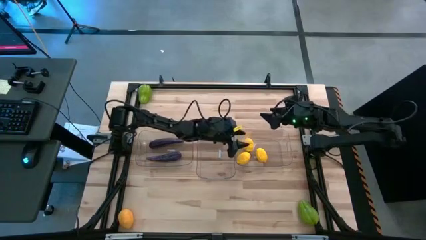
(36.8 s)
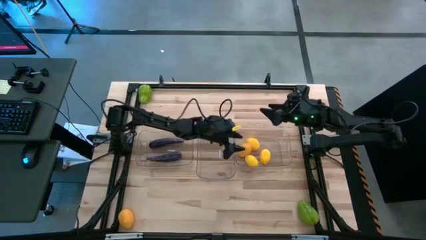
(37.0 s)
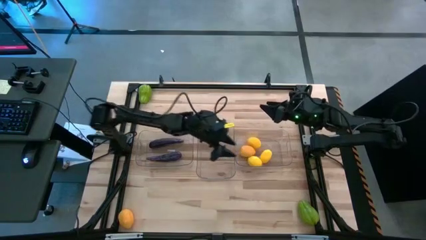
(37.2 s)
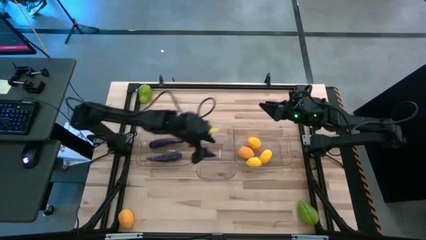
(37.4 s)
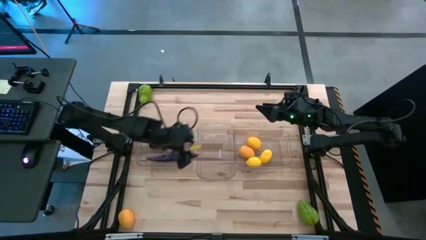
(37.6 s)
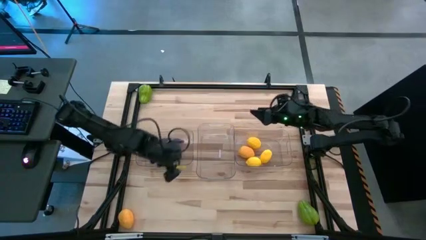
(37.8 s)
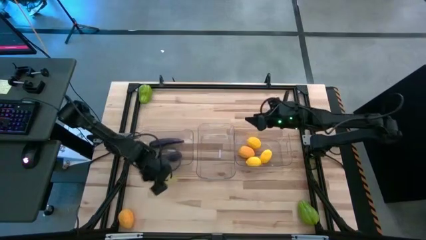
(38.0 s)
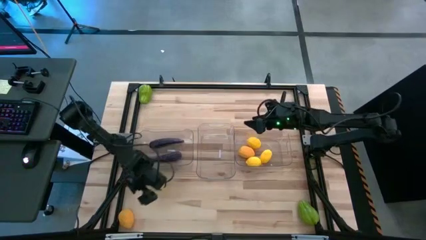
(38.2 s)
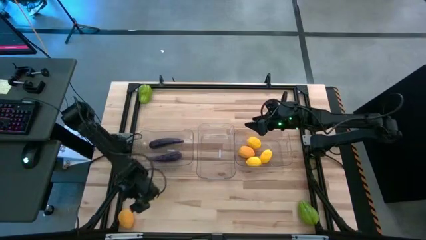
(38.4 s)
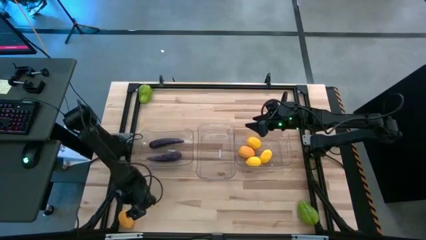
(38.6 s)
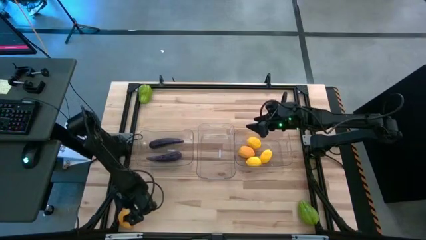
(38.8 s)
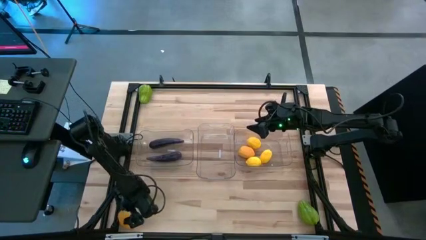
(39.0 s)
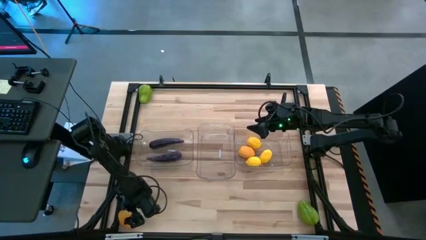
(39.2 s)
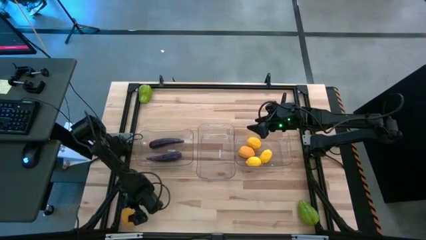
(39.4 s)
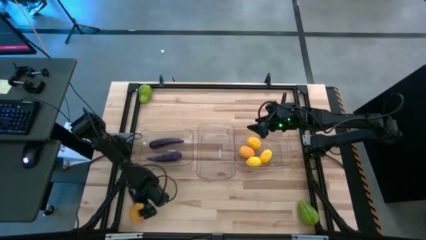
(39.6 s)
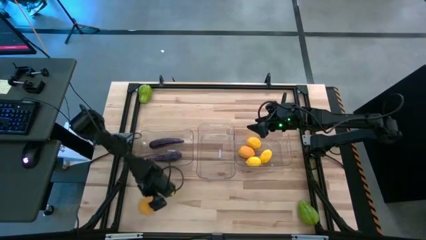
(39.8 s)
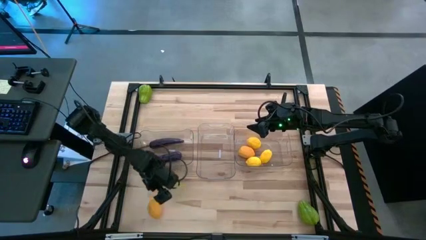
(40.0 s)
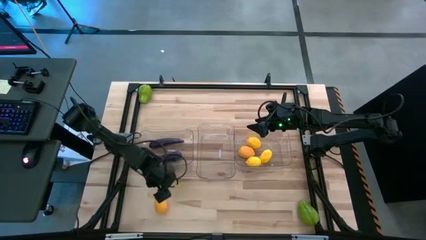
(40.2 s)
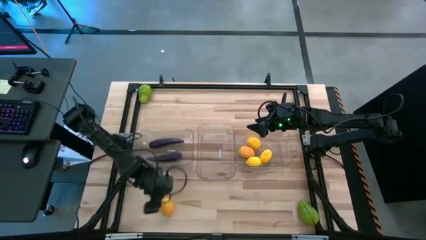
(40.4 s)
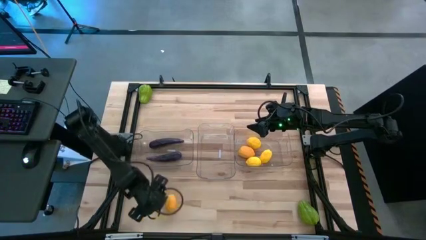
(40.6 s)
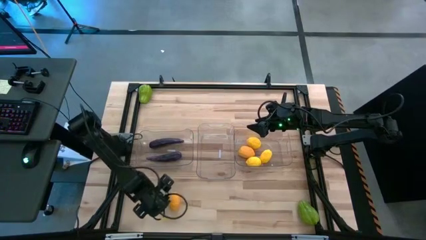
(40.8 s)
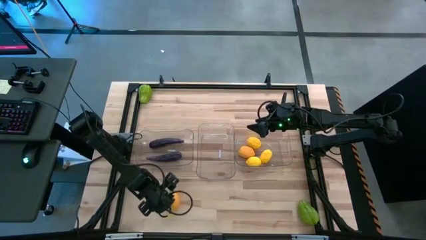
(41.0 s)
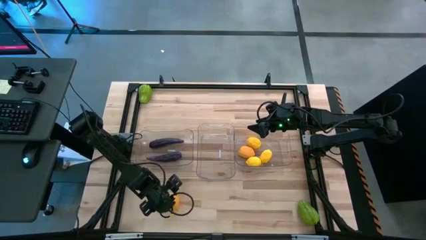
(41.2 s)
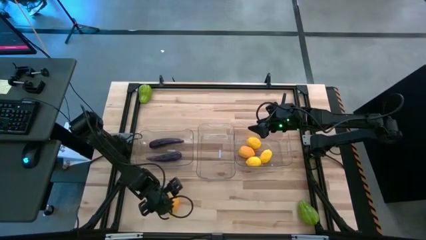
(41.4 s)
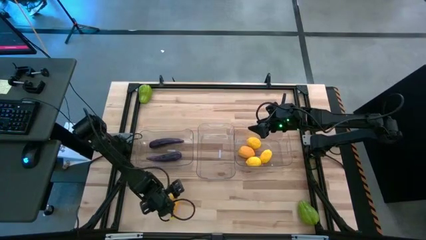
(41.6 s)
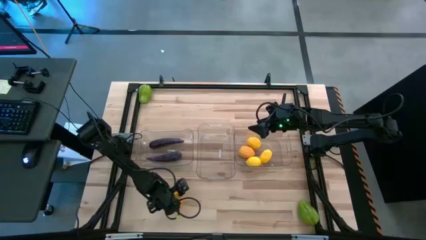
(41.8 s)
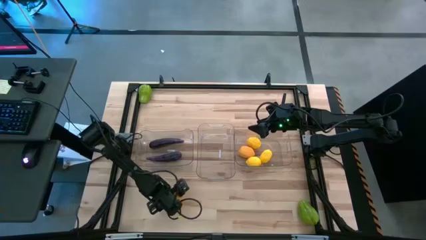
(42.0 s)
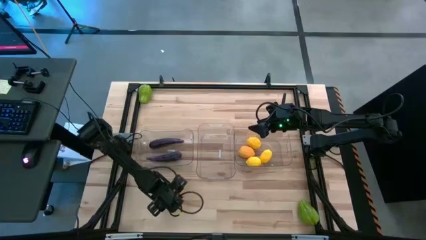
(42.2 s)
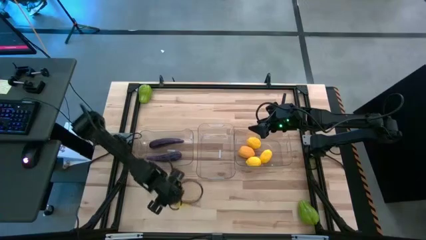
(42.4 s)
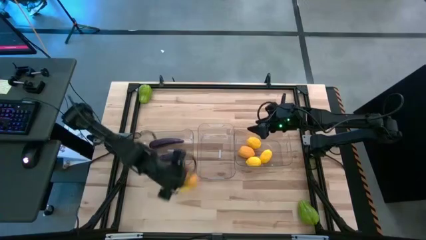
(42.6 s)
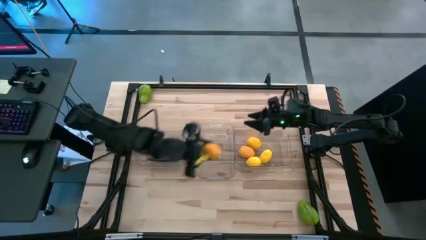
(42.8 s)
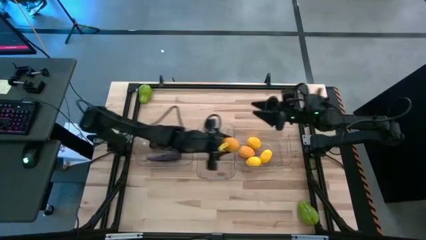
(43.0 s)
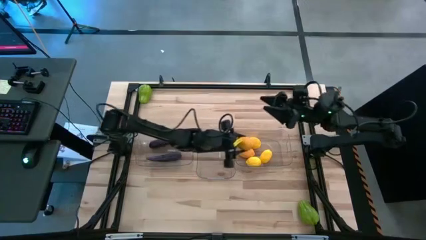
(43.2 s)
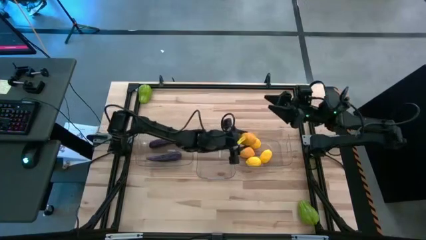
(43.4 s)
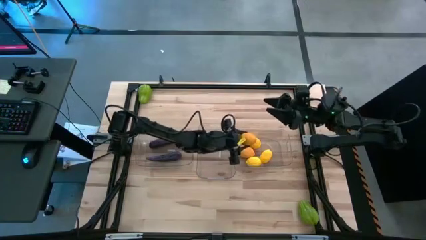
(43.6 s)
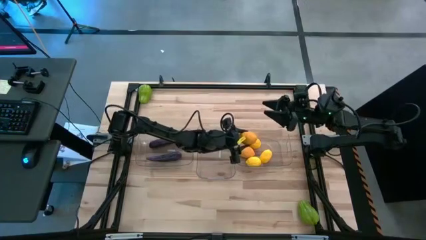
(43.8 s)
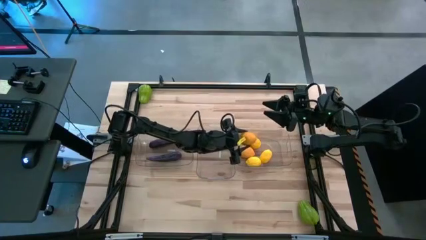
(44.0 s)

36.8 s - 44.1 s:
Task: Sort produce into baskets
Put the lemon into the right transparent bin

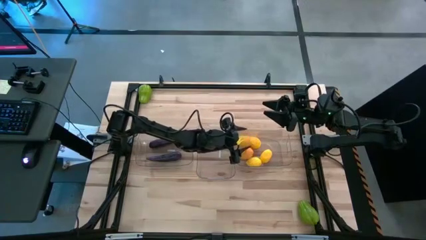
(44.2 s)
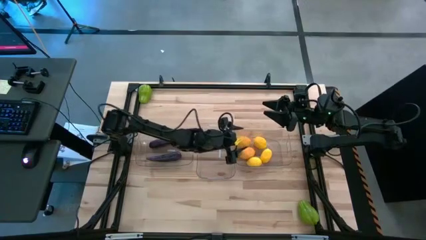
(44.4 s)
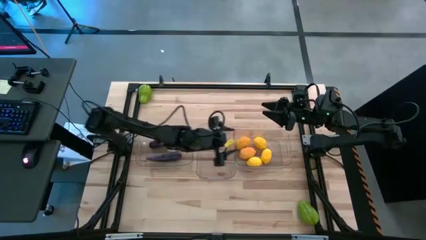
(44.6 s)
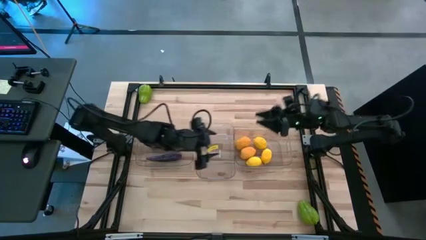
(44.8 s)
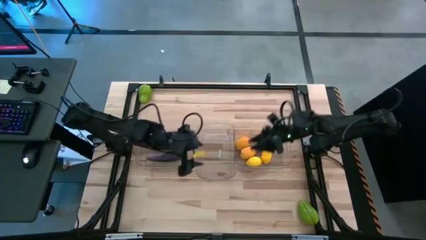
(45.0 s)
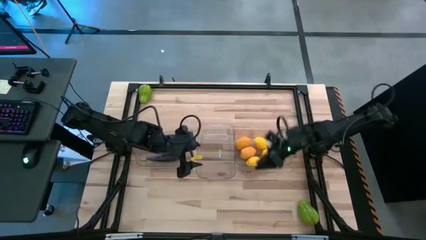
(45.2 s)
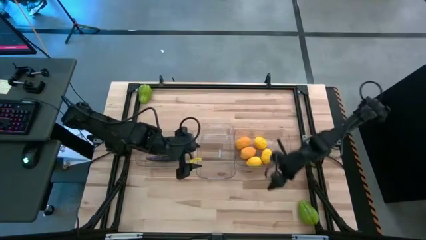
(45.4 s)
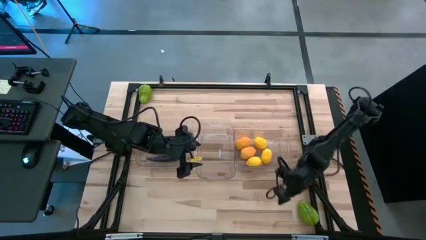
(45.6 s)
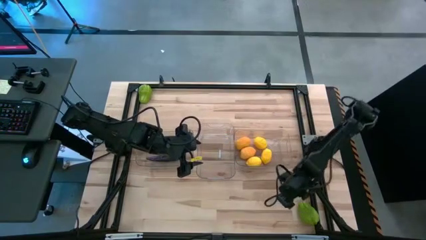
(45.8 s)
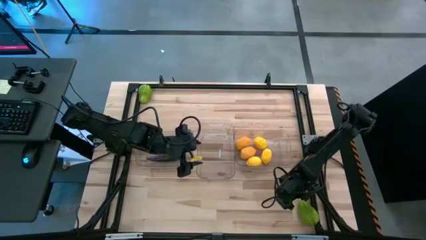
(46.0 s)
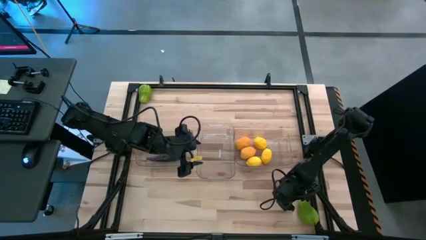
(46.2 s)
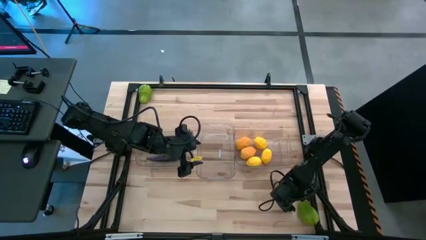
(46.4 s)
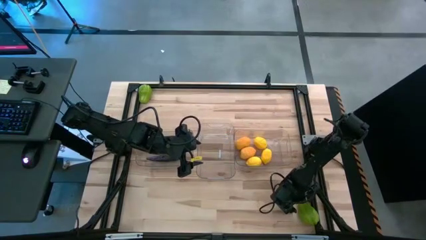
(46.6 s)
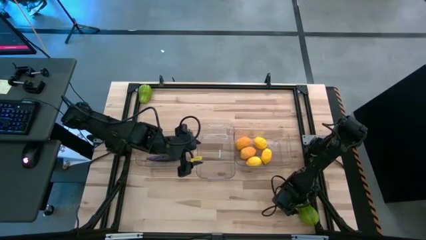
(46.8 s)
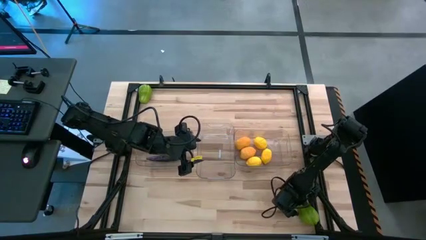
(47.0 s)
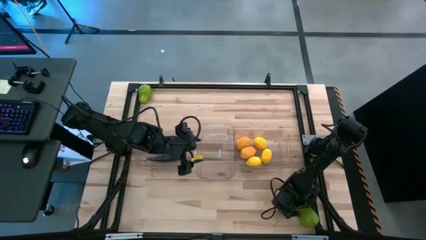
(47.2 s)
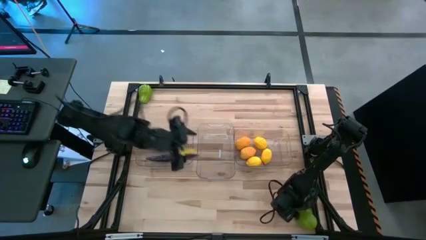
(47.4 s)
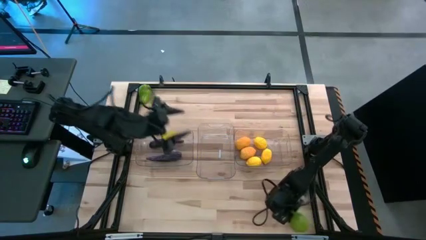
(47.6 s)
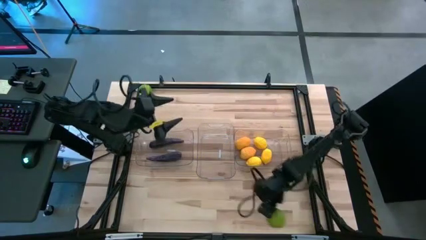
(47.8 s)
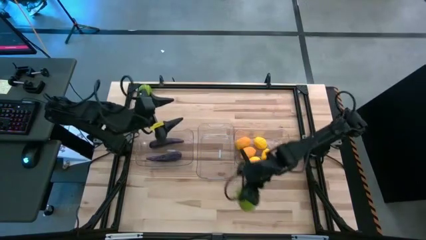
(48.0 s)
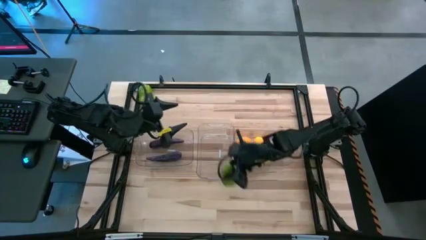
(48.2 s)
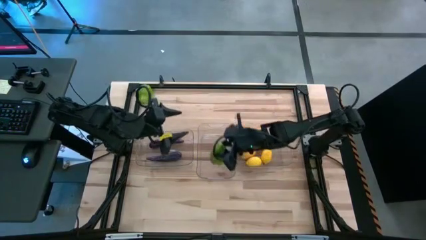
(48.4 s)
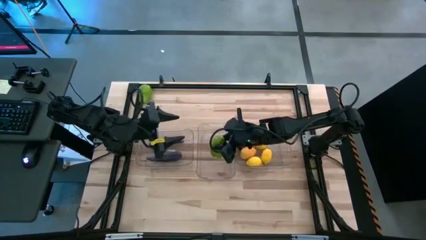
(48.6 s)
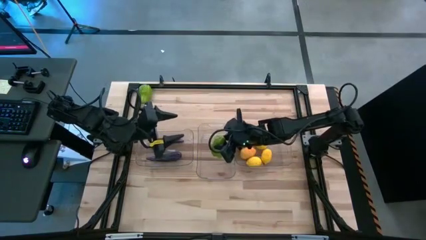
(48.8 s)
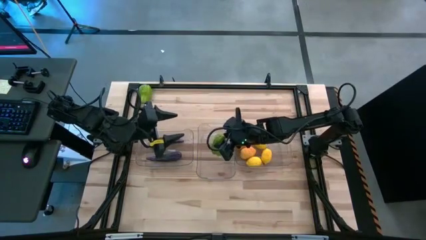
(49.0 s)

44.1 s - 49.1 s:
Put the chayote into the middle transparent bin

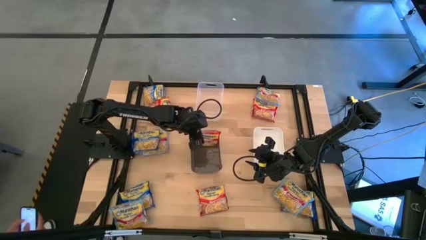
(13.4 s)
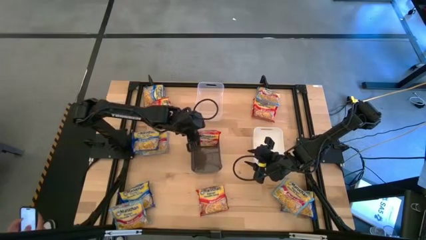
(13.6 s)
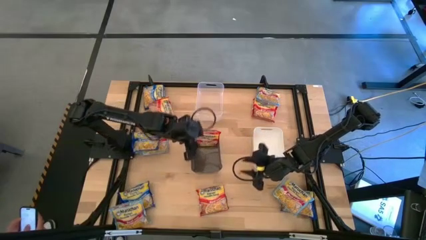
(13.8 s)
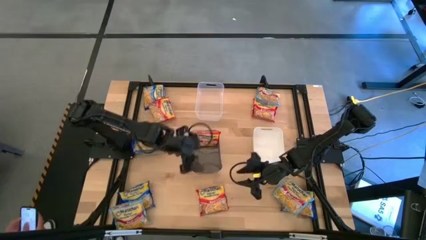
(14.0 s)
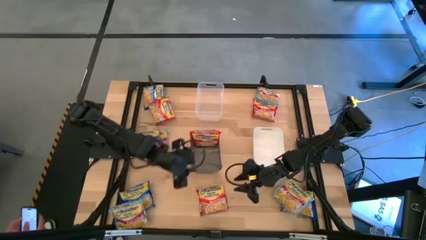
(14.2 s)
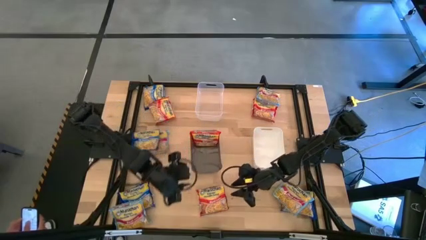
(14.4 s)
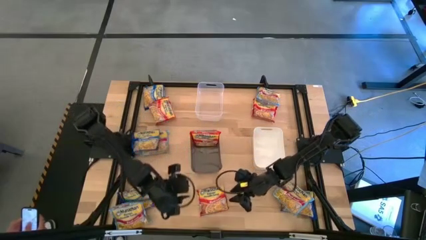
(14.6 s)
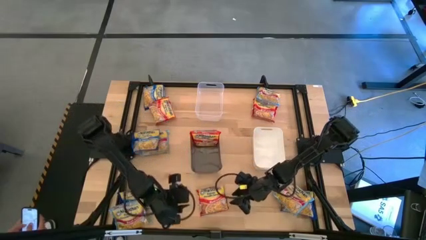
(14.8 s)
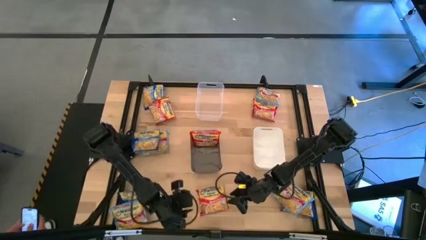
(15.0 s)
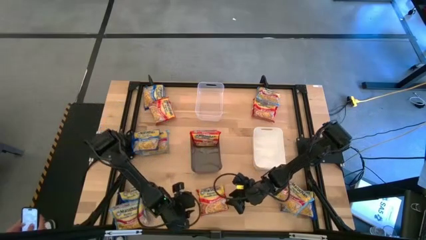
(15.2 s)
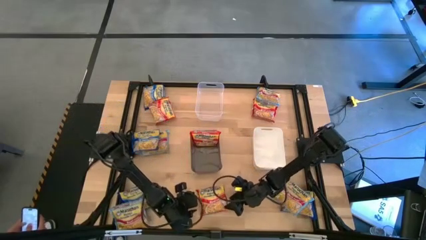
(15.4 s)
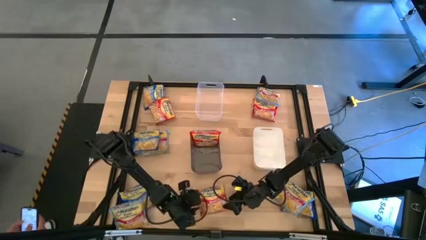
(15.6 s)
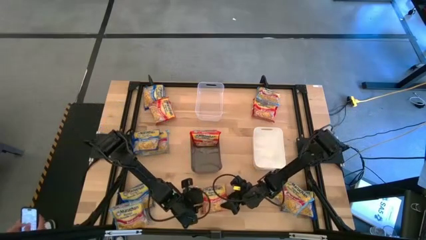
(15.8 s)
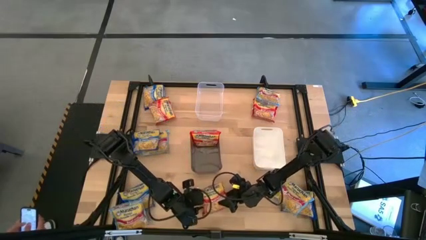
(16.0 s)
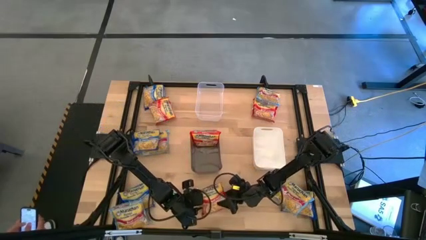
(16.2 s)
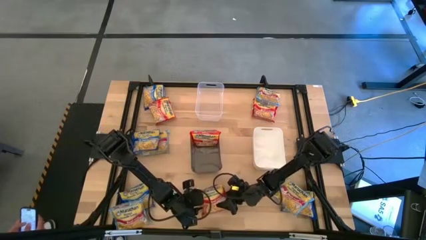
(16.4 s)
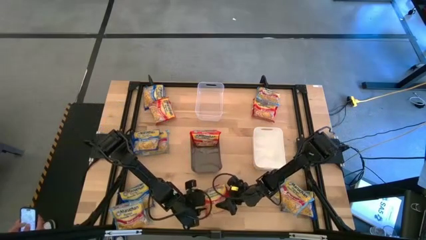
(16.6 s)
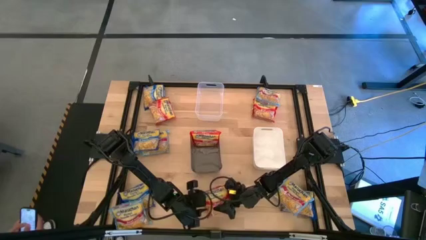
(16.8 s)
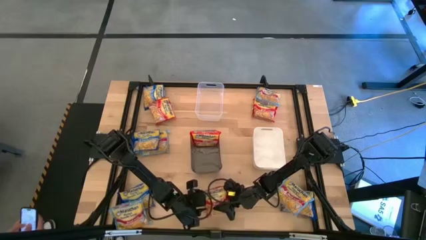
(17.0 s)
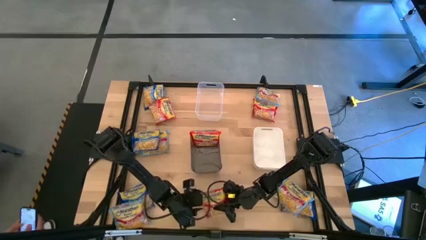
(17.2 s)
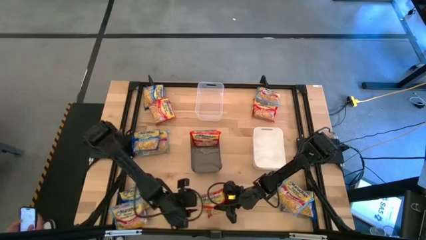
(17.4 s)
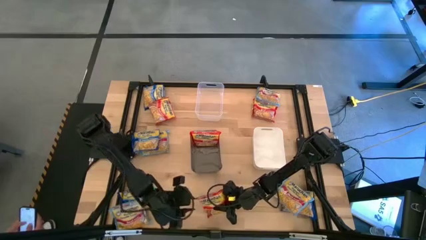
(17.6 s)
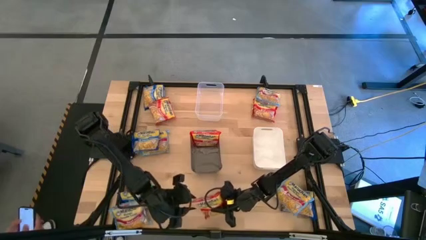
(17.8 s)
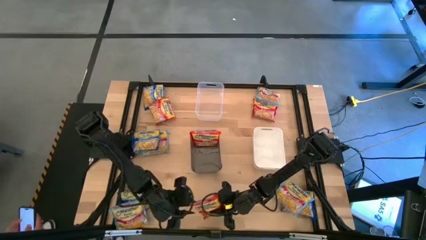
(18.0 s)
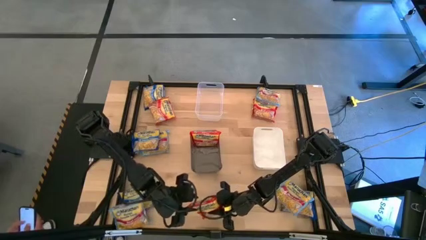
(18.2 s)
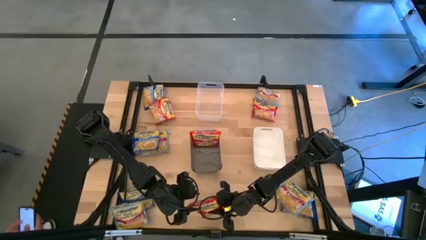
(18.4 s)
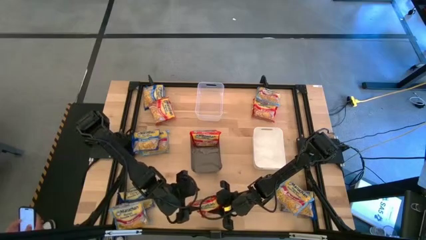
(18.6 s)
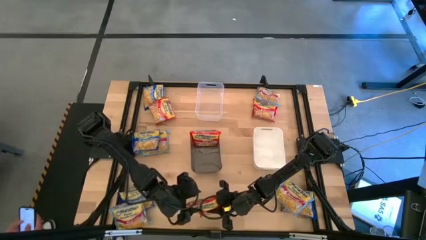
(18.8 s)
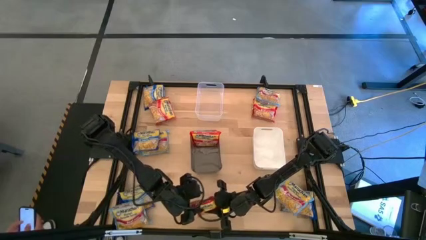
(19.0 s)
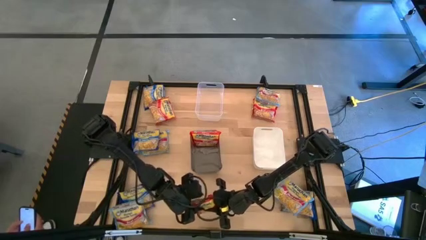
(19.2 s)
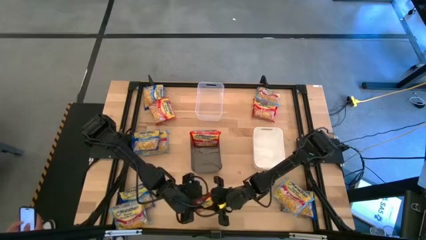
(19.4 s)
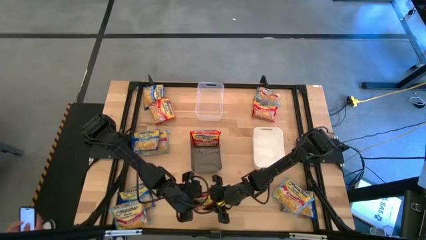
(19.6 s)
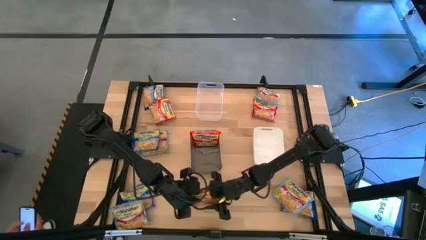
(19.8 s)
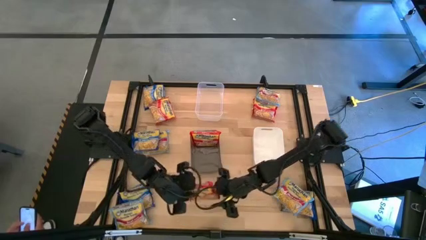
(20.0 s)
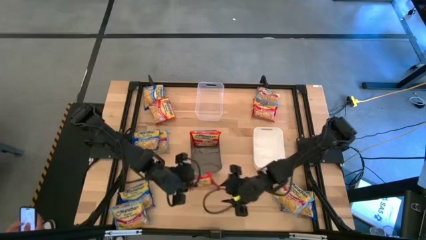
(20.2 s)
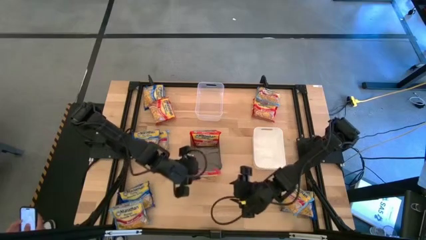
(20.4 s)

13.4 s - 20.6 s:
Task: Sort Maruchan noodles
Put the red noodle pack into the gray bin
